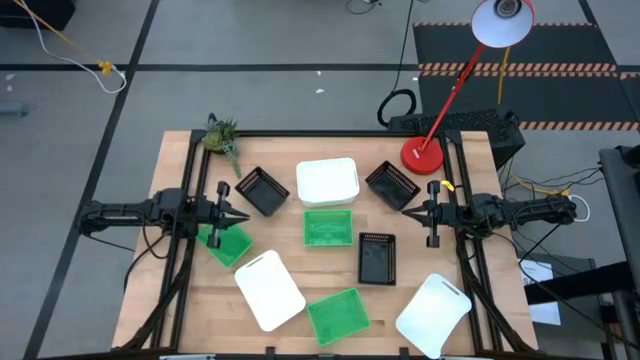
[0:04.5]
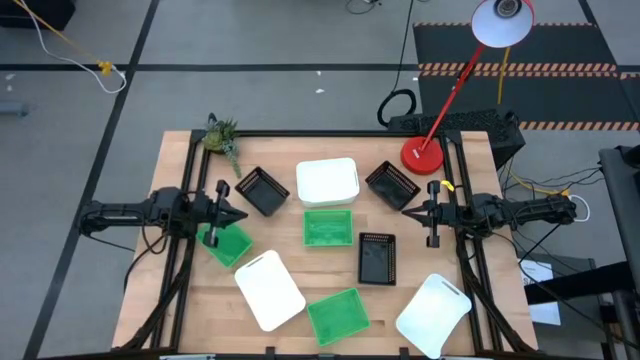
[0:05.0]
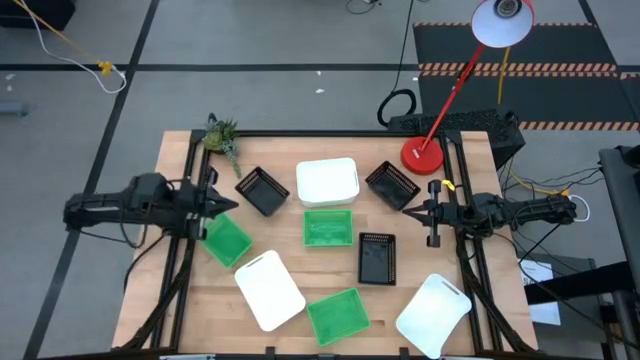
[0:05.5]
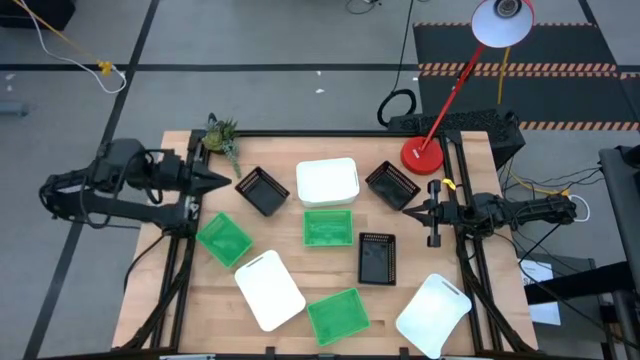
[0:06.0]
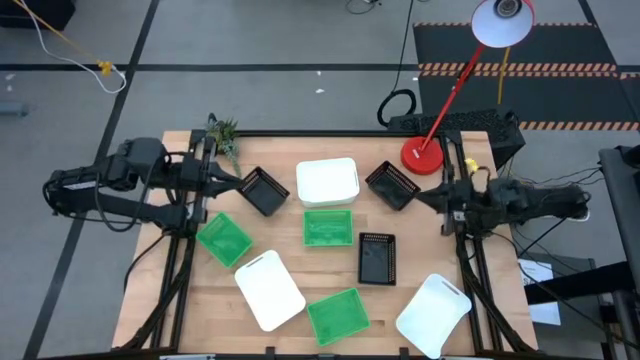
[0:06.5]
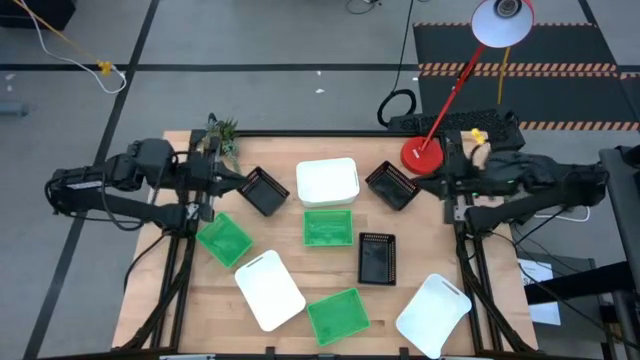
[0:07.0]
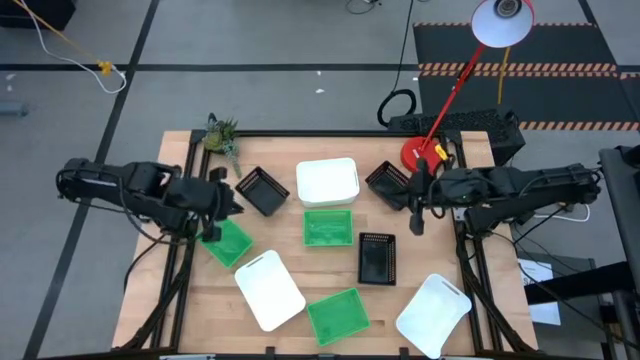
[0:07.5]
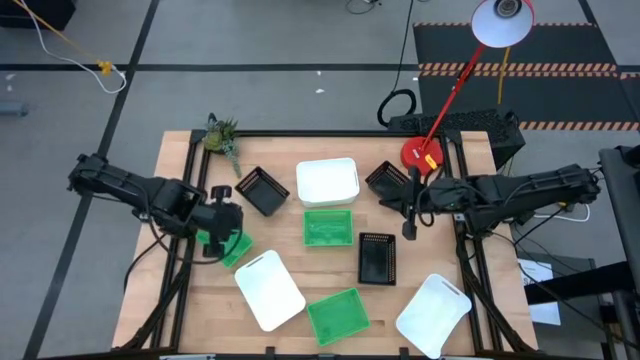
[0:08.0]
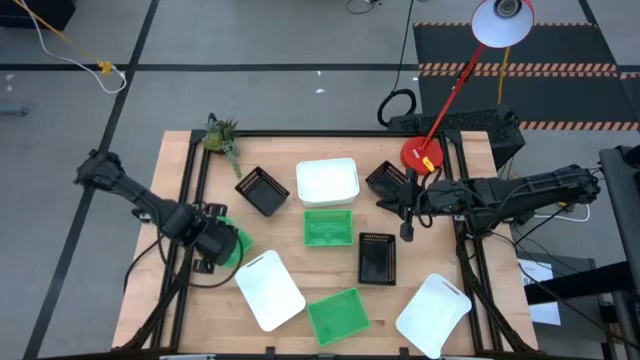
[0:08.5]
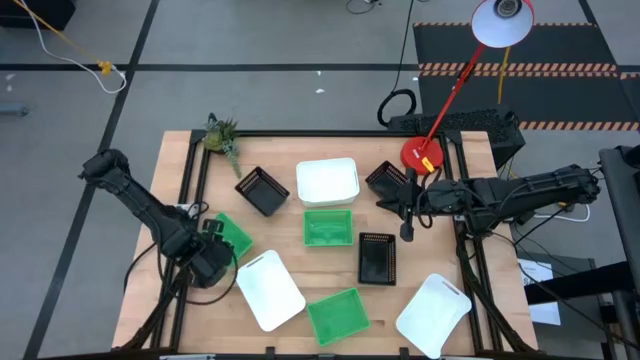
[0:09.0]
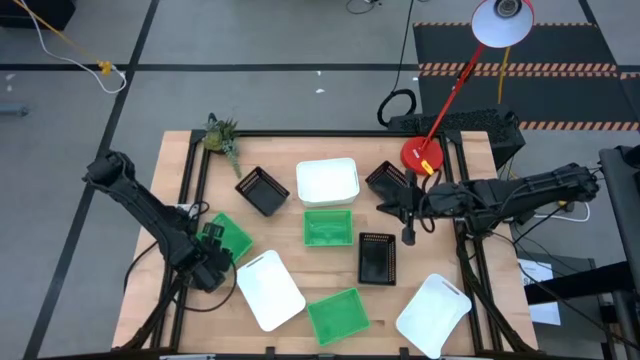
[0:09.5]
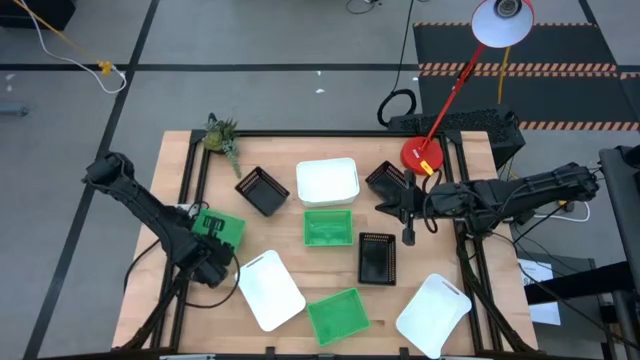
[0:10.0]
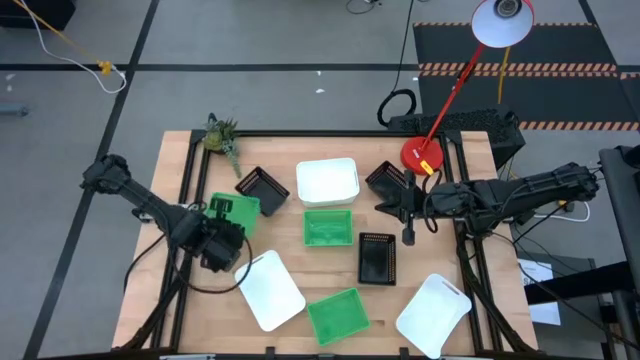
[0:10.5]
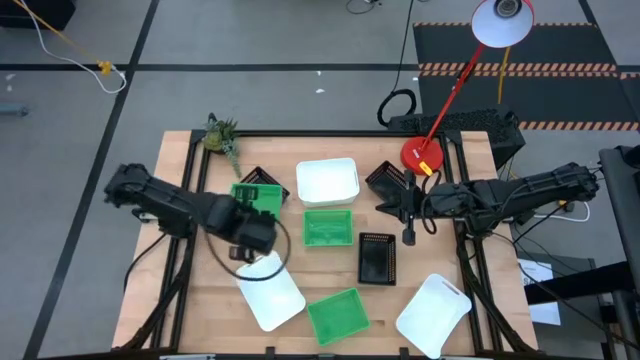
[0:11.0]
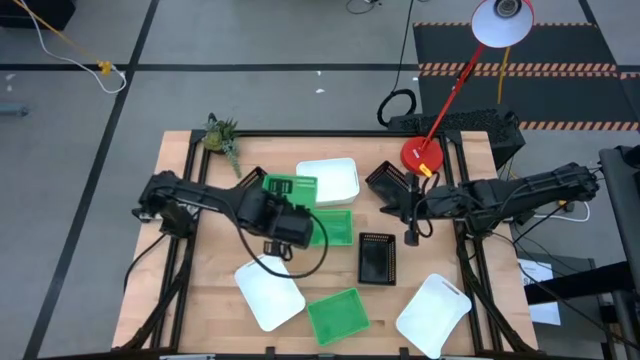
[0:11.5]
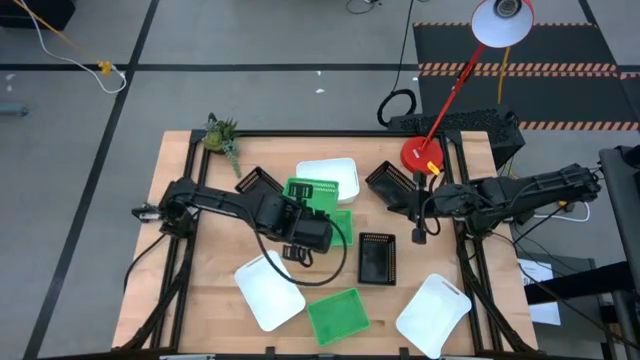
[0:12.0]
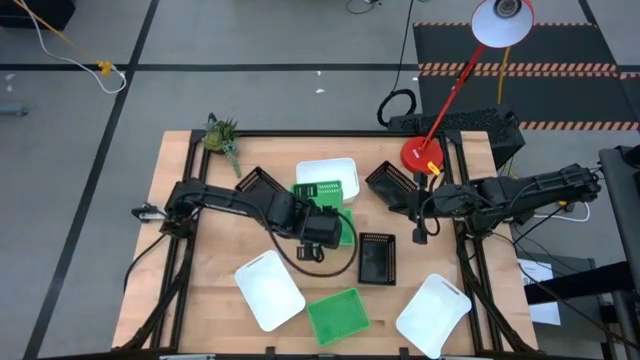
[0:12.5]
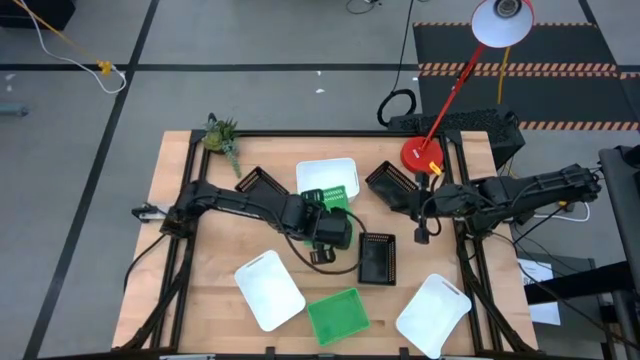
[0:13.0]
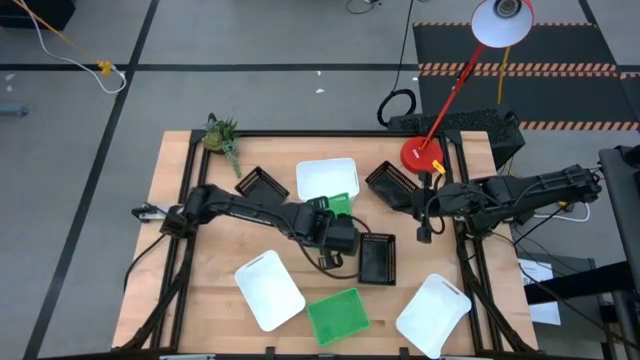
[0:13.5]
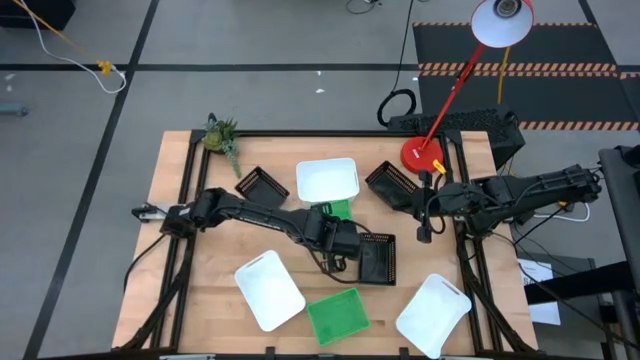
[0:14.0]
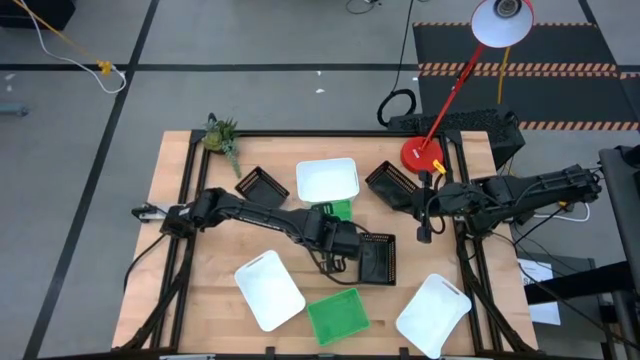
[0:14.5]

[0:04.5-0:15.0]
Stack the top left green bin on the top green bin

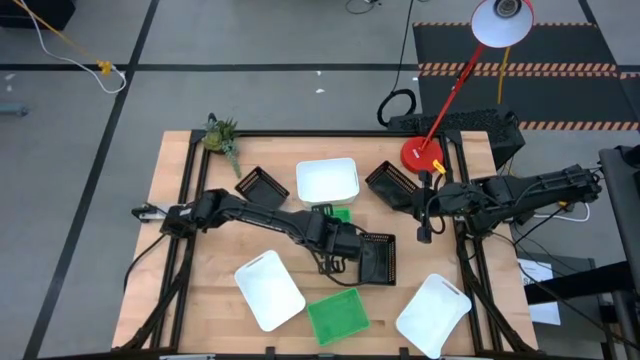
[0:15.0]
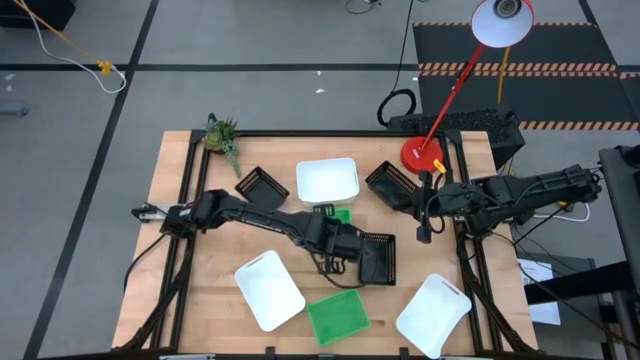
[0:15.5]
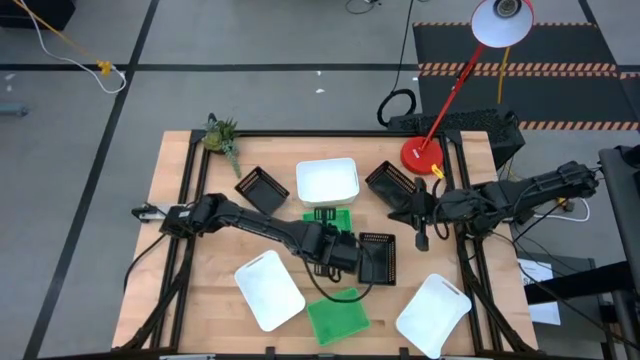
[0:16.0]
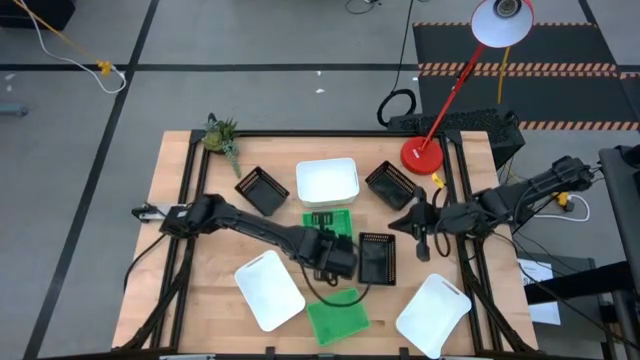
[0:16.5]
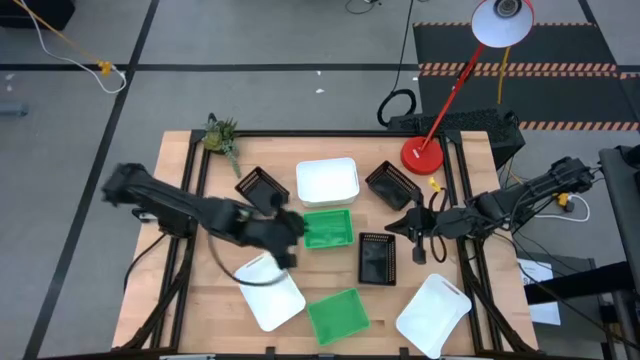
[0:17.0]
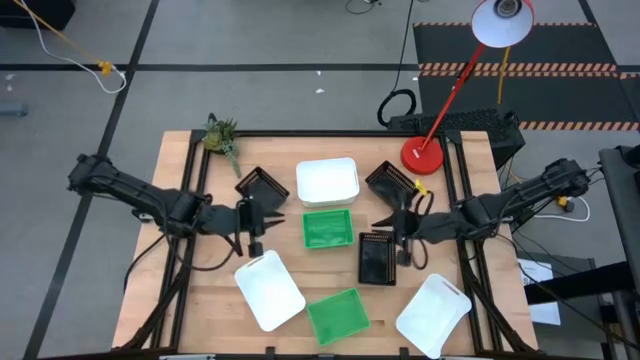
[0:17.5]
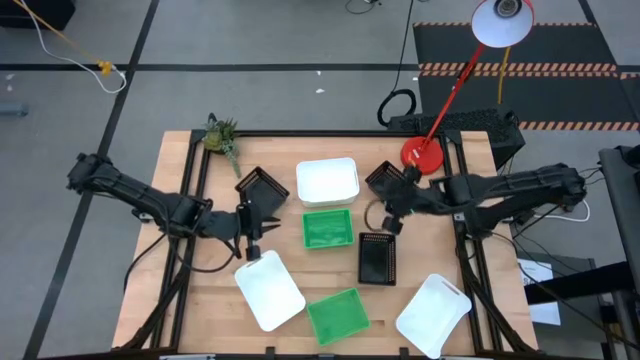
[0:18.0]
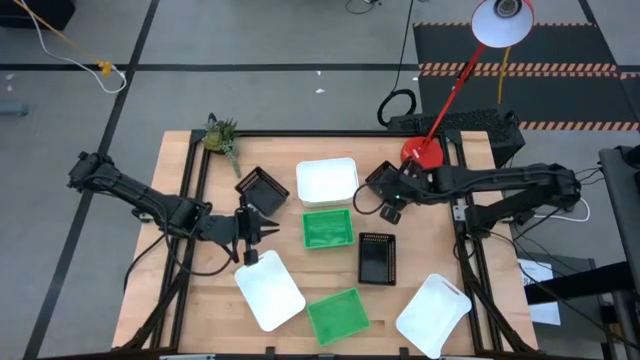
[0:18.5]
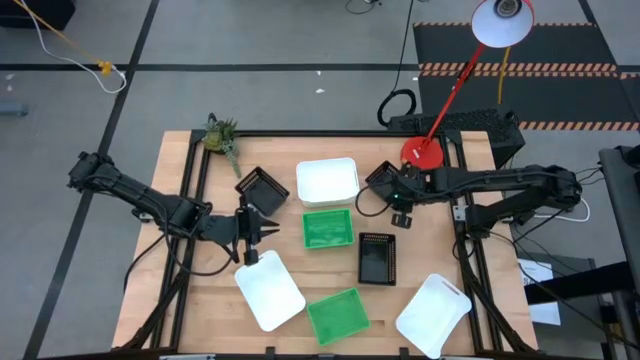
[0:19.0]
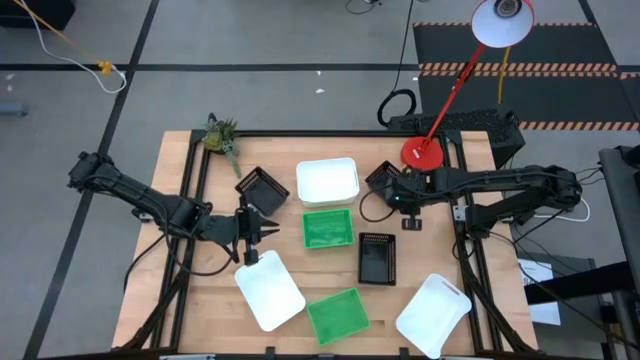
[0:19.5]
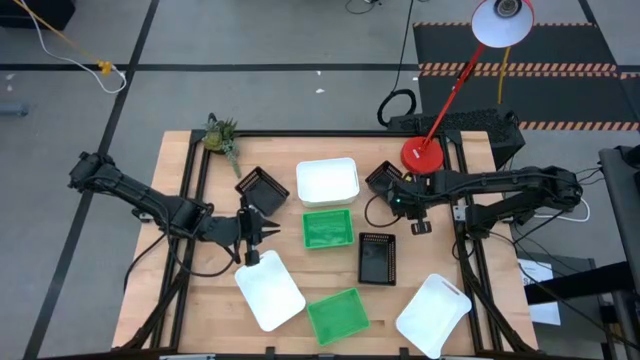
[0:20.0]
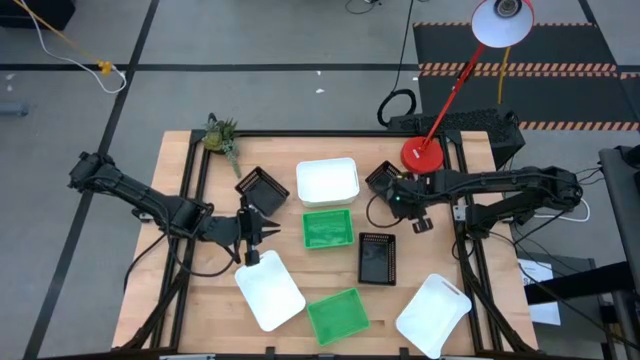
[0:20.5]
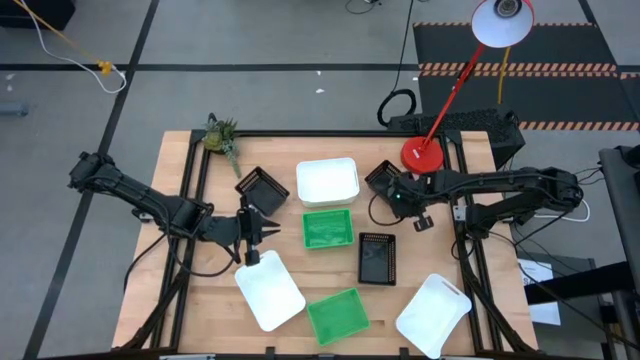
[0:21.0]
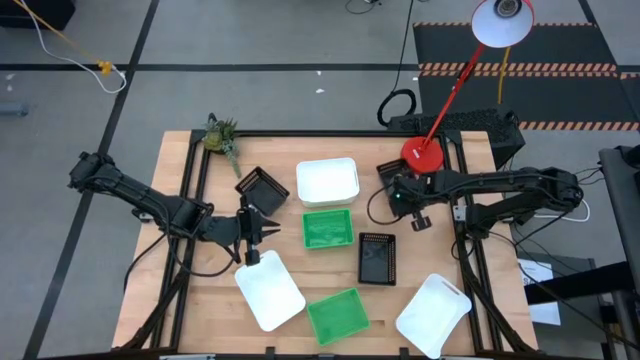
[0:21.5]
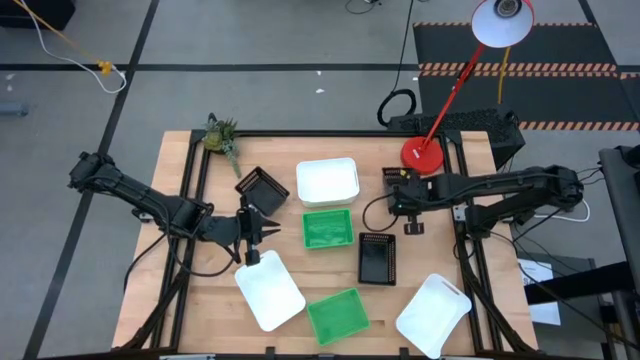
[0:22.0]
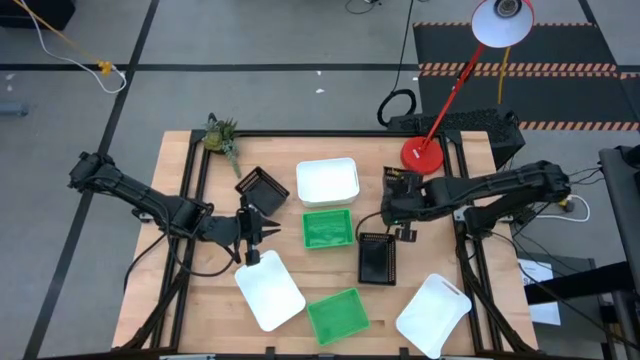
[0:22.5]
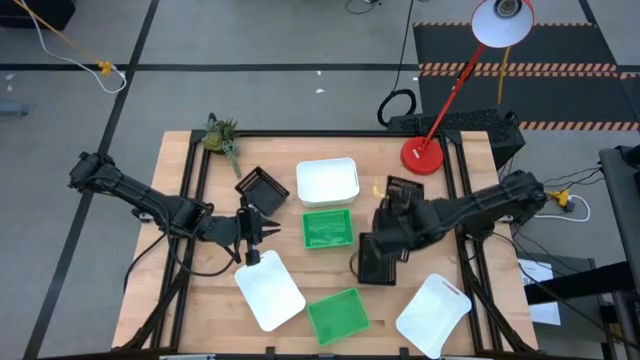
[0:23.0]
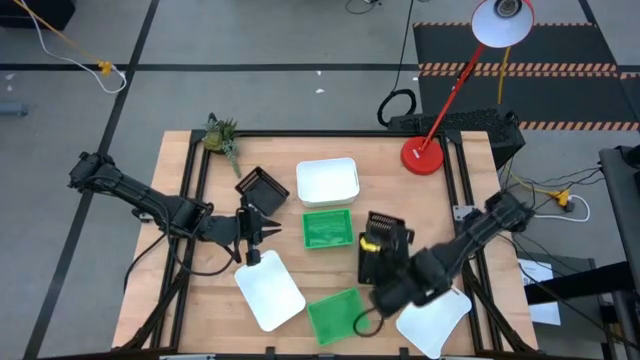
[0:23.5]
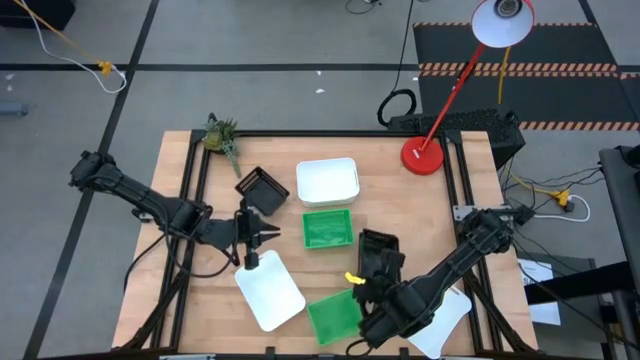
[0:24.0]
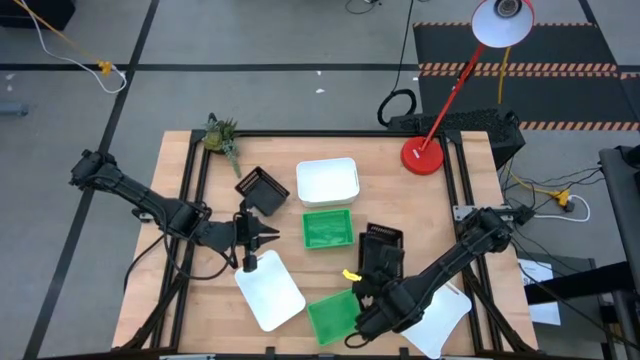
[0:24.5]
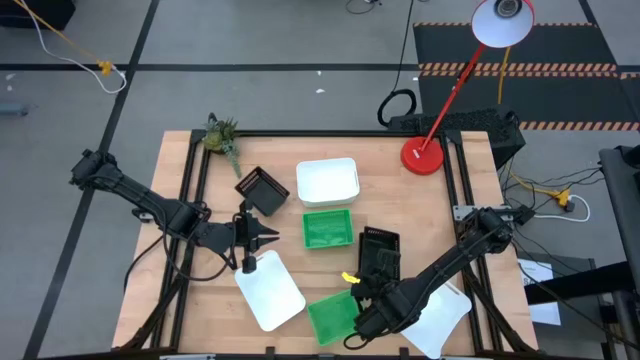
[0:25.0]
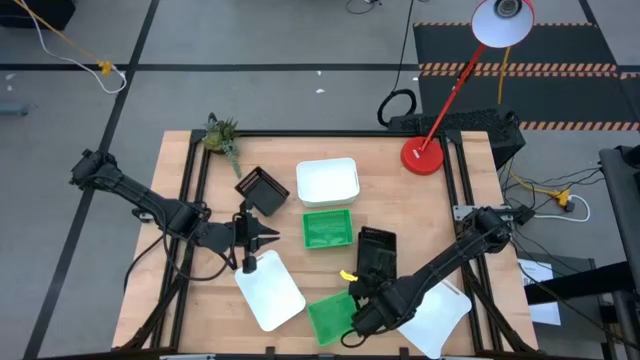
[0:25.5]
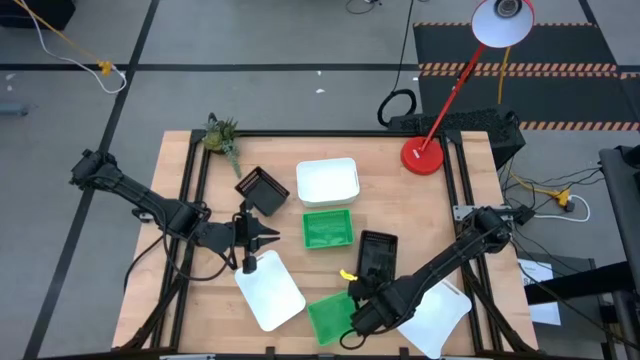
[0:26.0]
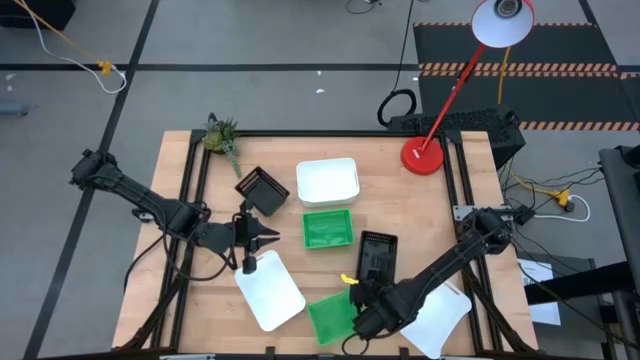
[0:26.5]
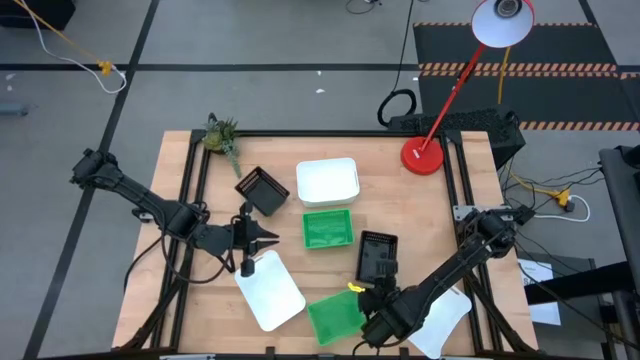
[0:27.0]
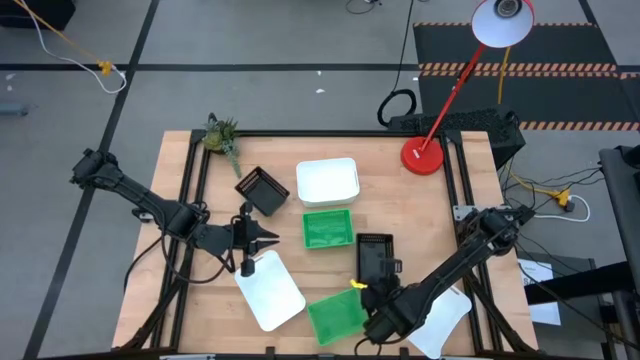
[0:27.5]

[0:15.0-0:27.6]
Stack the top right black bin on the bottom black bin
